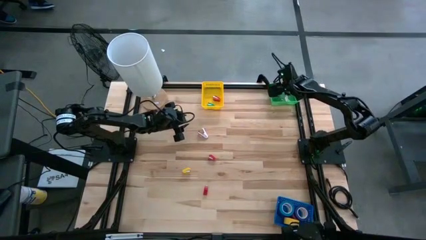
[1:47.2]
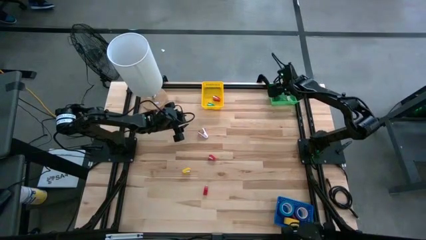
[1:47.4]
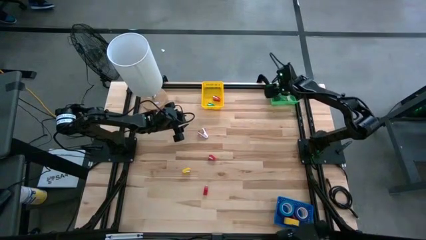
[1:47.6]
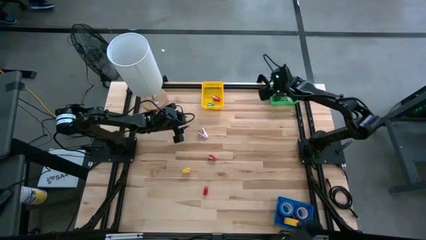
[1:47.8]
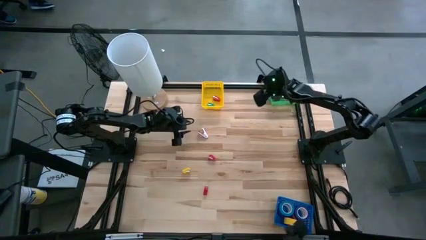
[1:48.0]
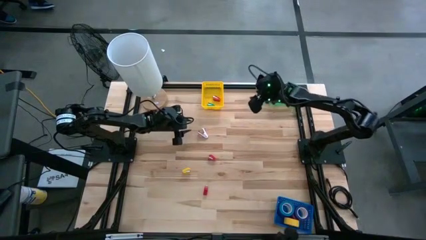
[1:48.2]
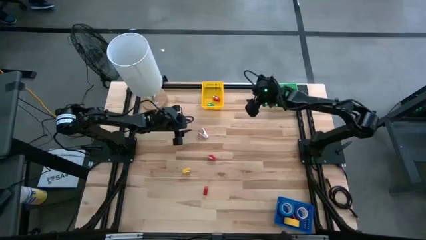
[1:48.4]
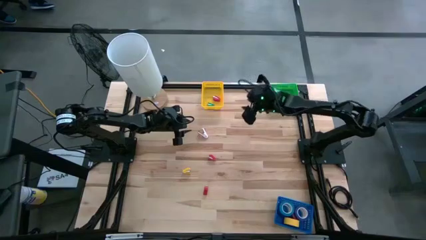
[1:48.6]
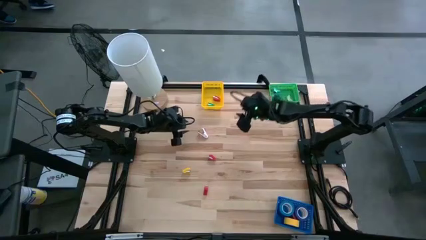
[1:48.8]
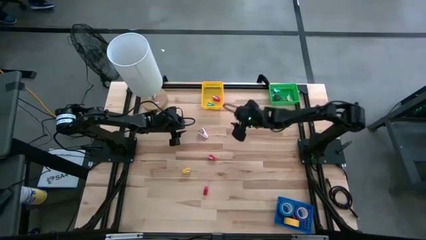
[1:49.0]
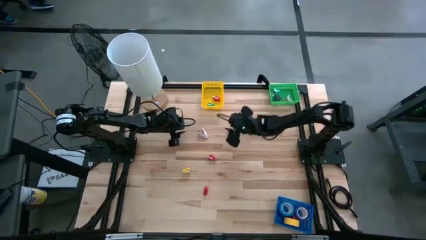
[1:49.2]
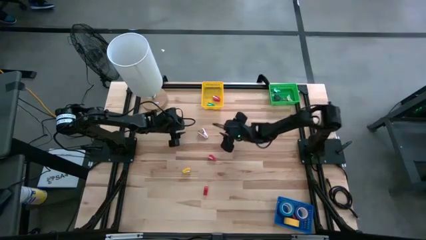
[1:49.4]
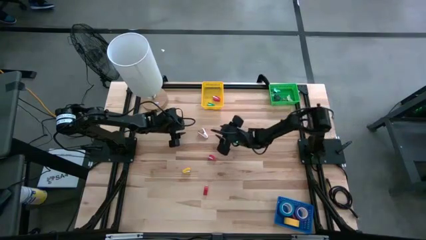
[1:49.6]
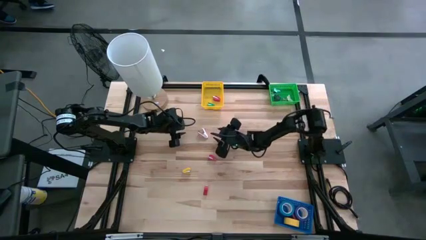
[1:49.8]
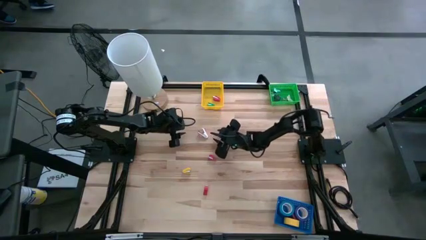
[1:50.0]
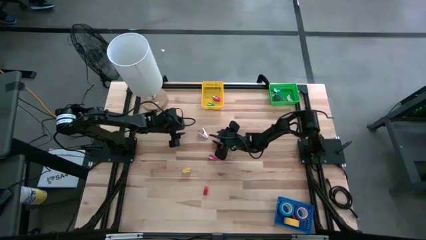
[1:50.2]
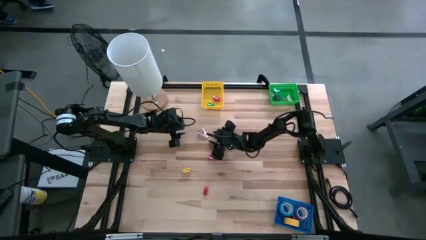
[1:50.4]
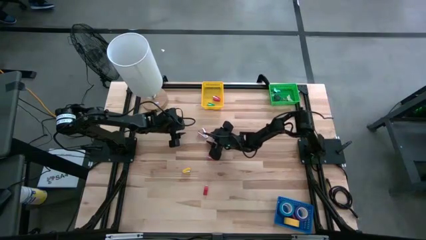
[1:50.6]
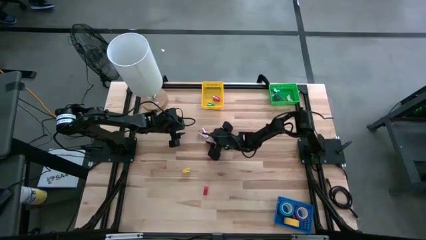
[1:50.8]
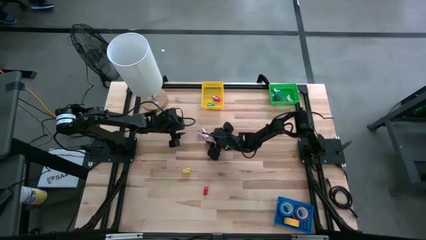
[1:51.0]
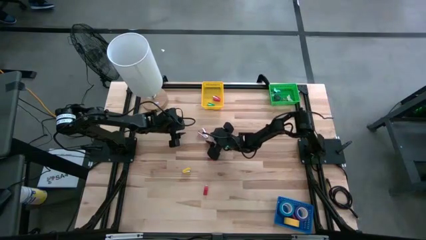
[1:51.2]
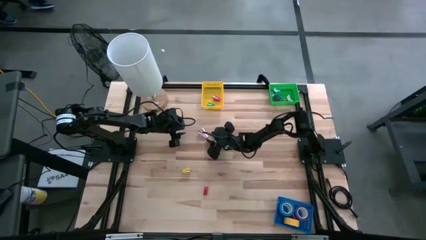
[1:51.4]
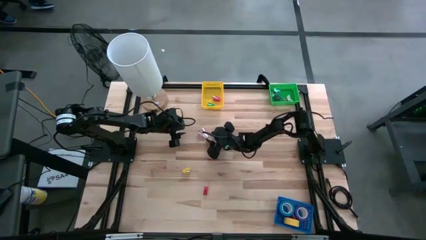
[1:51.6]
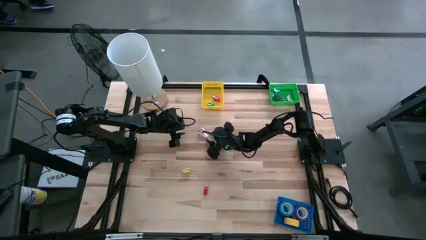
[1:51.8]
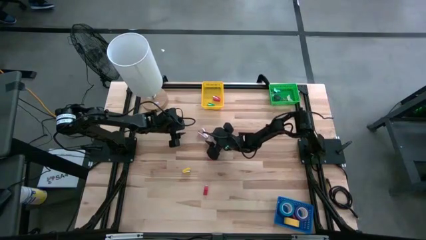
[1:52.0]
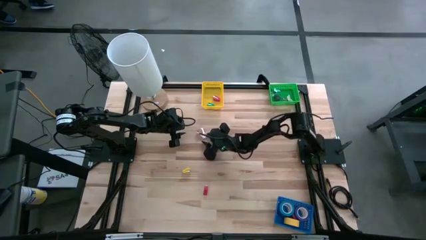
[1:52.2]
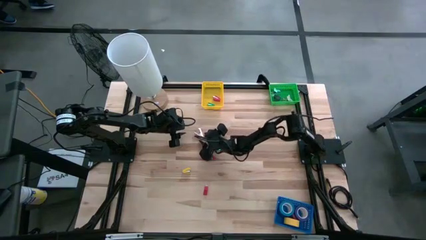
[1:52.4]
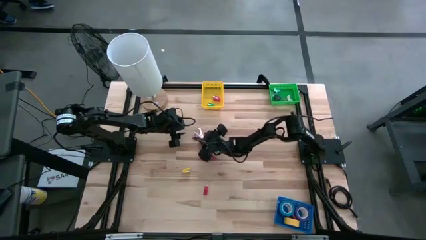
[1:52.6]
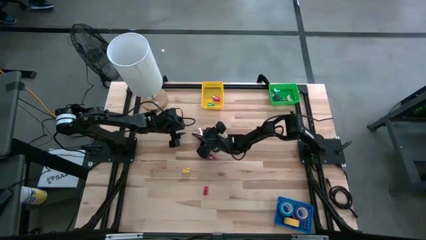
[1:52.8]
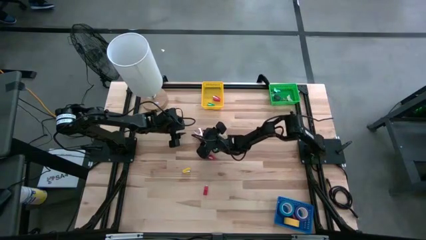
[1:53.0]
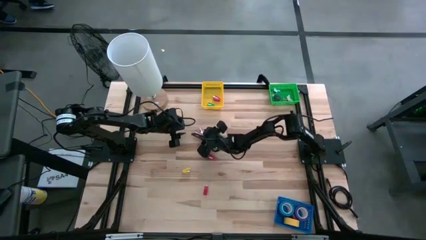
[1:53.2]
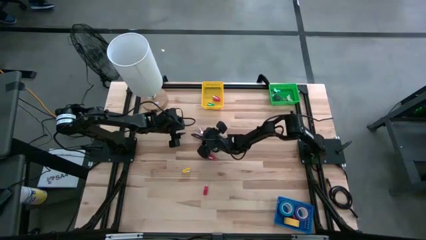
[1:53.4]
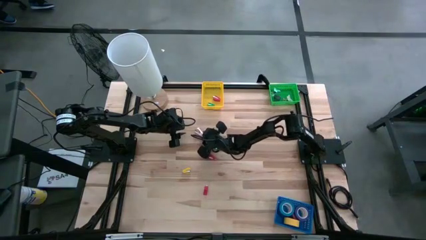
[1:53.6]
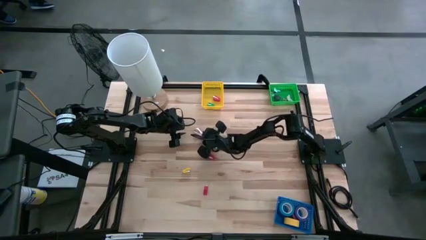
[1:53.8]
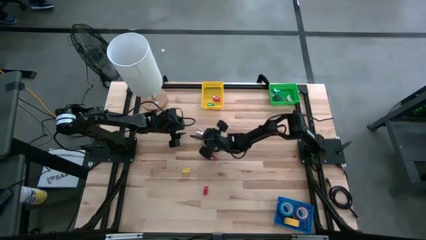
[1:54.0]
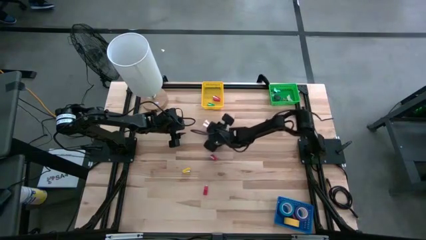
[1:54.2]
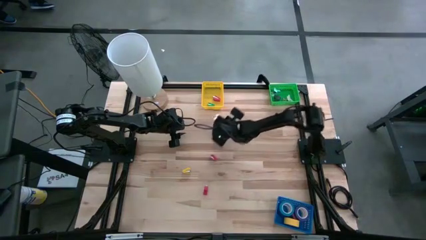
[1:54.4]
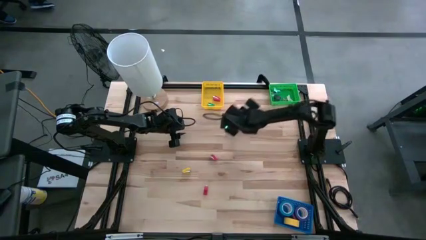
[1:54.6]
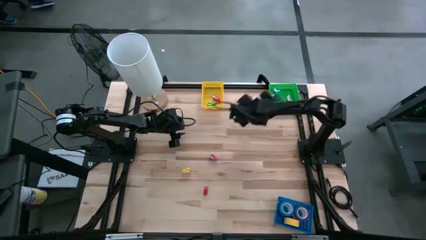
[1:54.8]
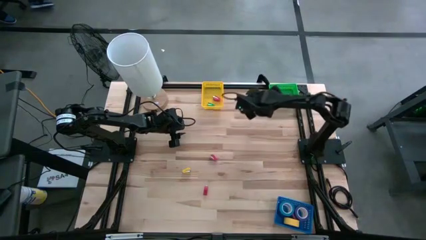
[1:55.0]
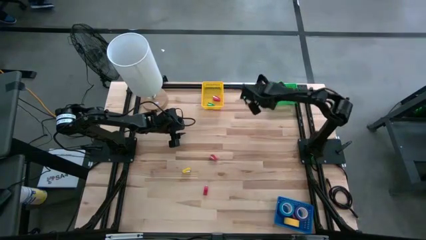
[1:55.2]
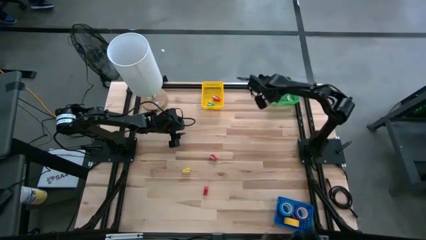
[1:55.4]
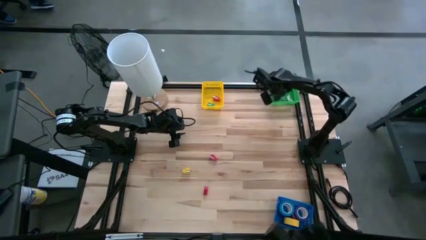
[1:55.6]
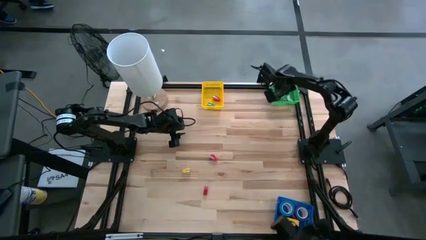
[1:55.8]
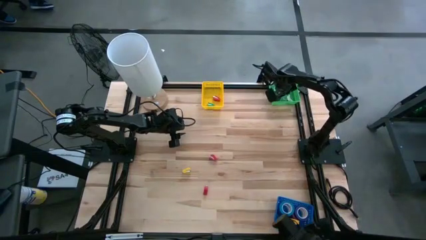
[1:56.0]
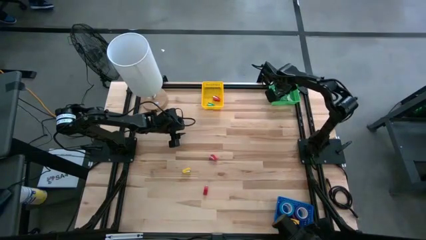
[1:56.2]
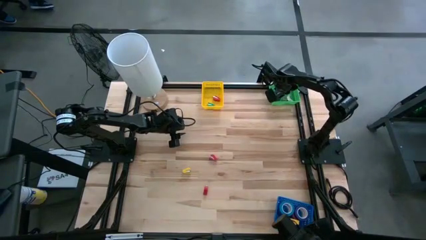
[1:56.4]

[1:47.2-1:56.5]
Task: Pick and place Stapler, Stapler remover, tape
Put the pink staple remover into the green bin

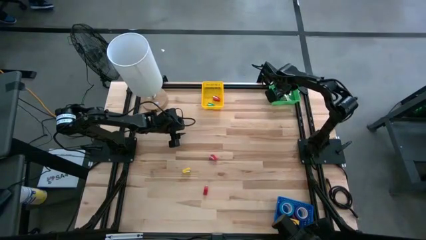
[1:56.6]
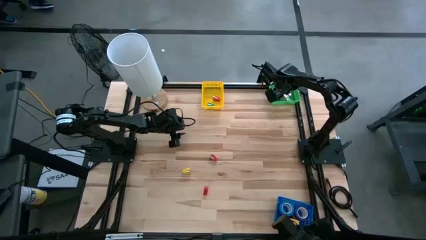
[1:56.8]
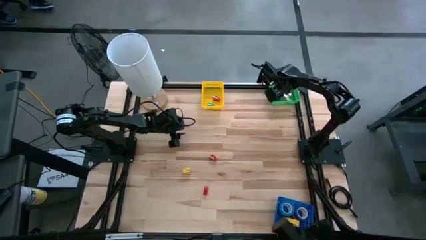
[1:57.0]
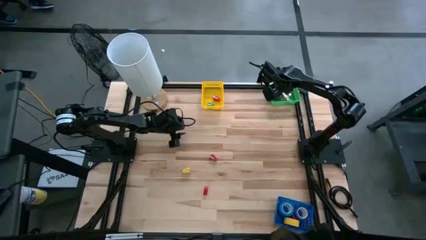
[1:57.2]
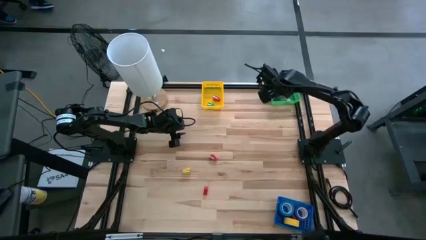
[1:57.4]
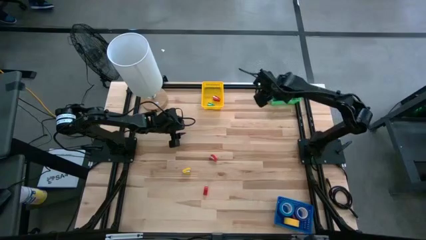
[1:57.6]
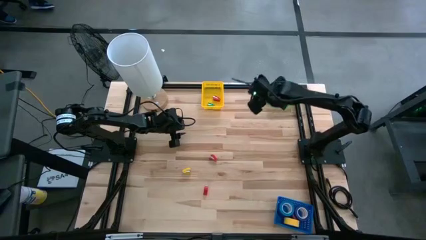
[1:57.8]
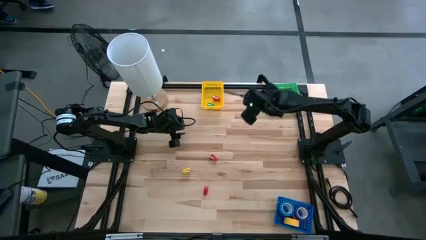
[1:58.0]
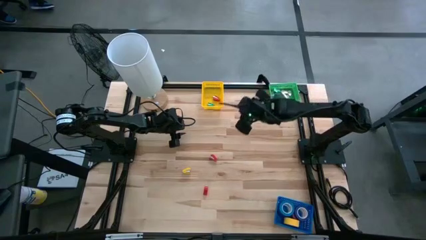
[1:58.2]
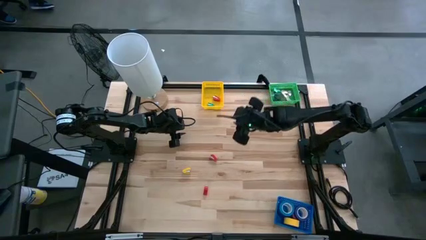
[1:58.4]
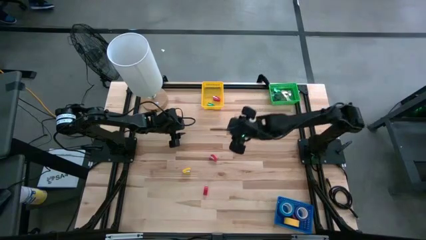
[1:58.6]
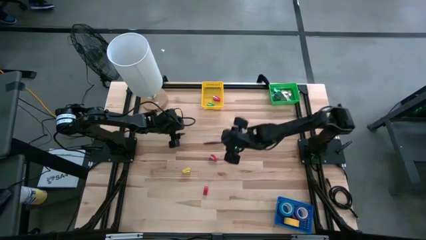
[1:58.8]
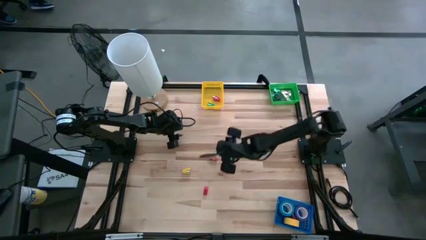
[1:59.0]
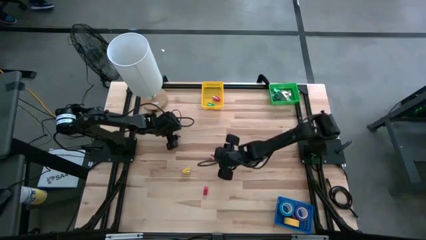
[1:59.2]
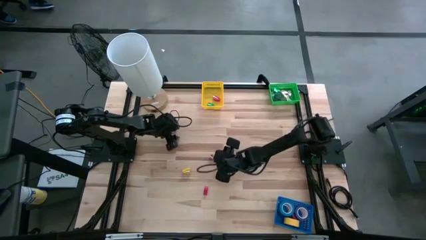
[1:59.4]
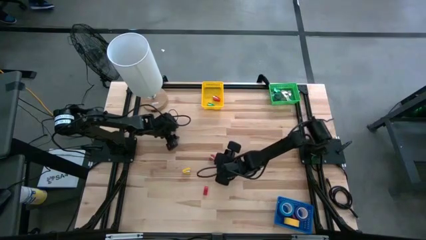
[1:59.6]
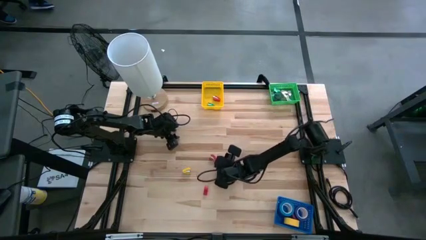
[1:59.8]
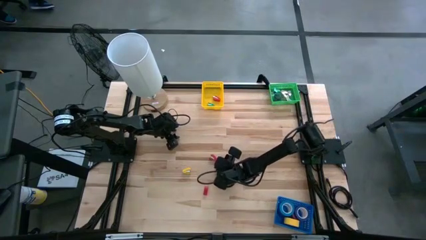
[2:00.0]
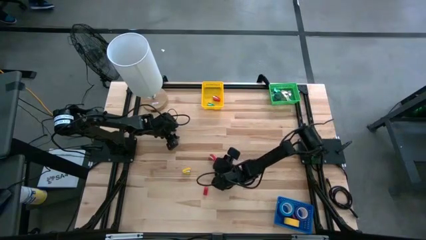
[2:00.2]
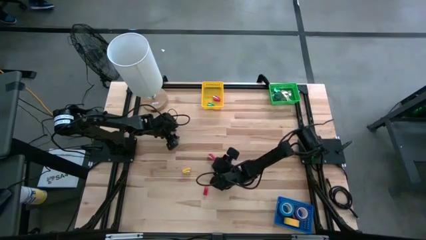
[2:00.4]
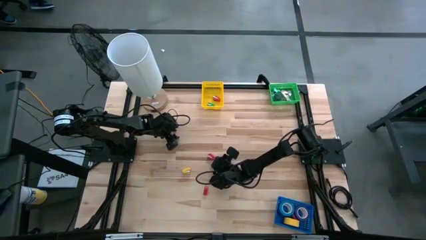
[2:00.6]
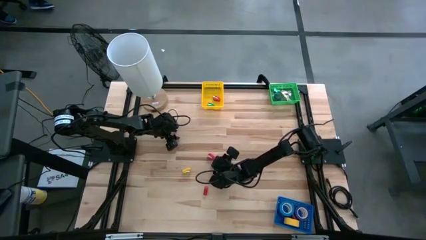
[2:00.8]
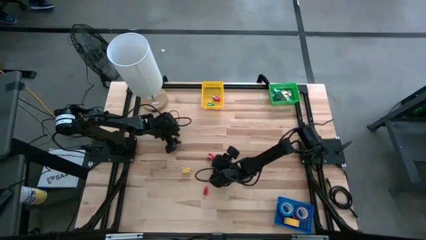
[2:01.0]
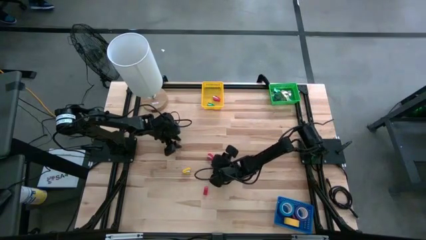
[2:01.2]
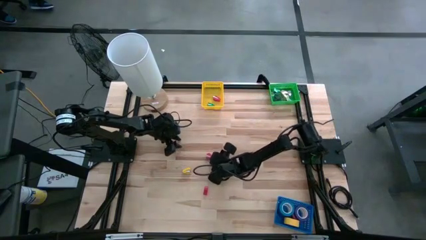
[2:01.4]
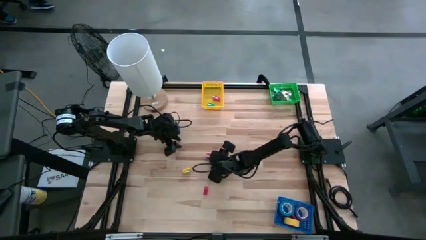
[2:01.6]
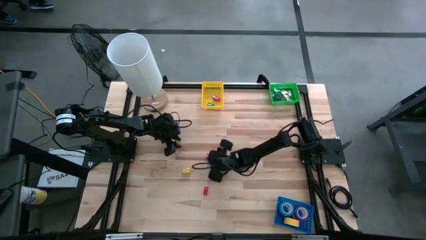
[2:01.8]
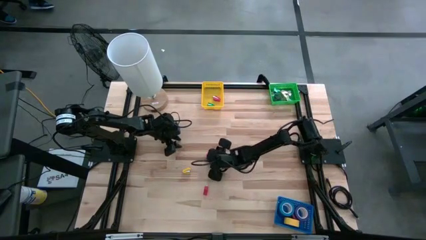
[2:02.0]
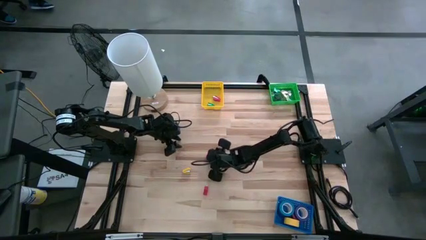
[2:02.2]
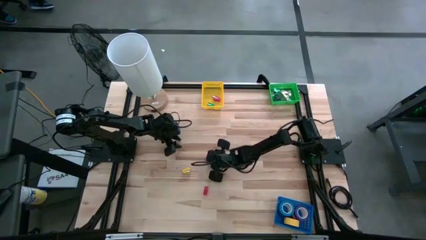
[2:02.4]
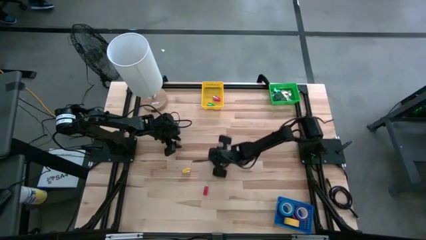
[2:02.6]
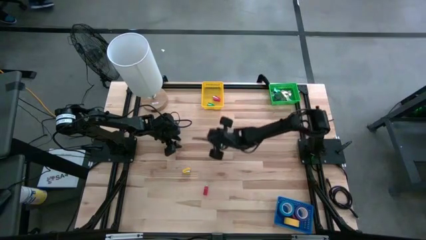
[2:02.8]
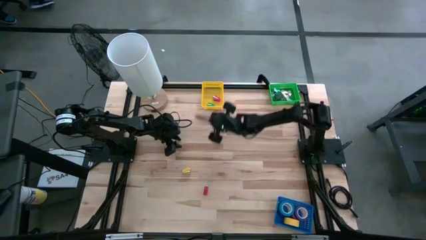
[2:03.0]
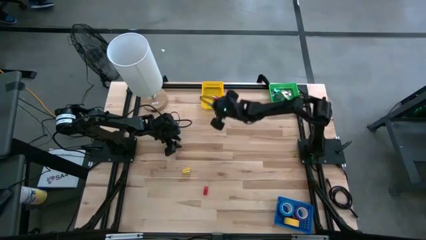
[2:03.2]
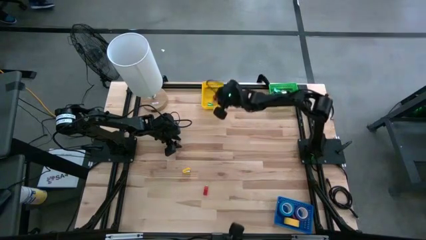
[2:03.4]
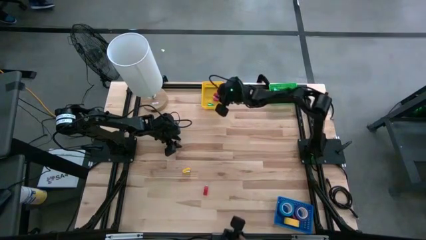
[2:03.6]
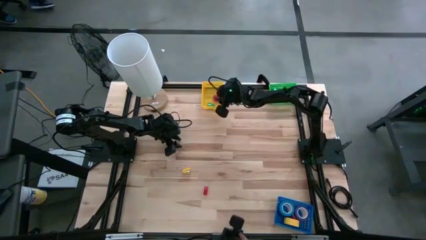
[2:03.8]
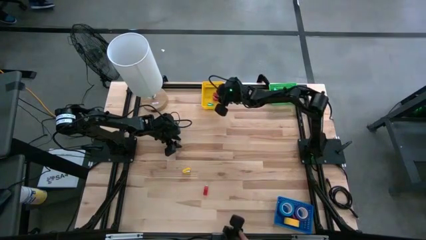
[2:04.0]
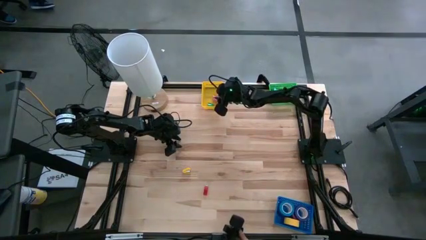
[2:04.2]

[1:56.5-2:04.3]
Put the top red stapler into the yellow bin
